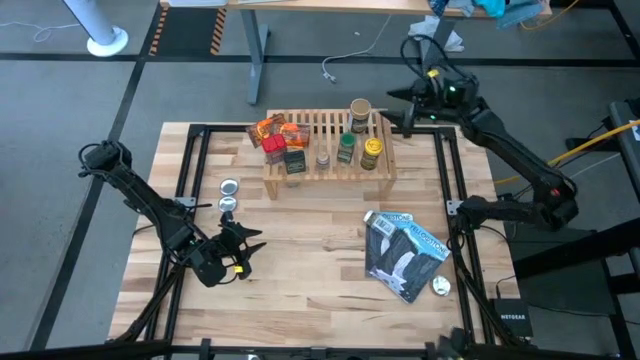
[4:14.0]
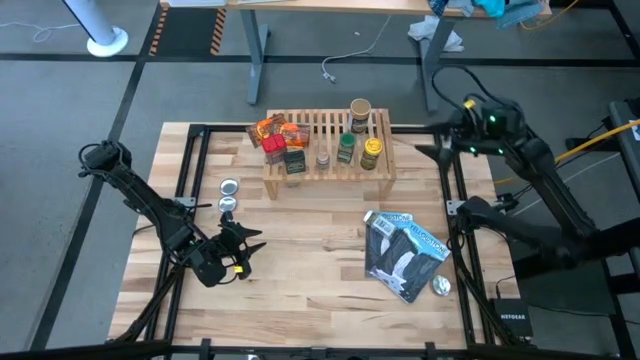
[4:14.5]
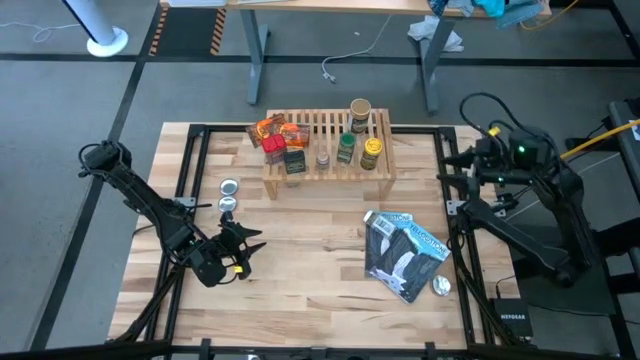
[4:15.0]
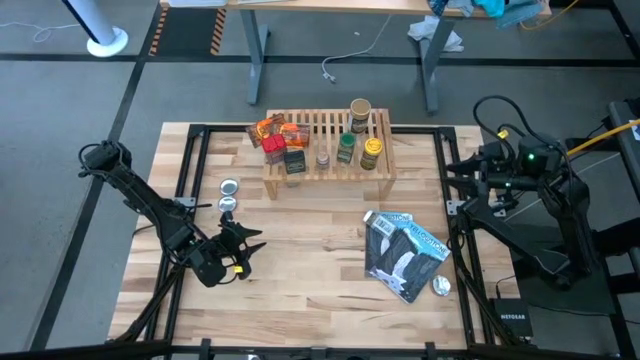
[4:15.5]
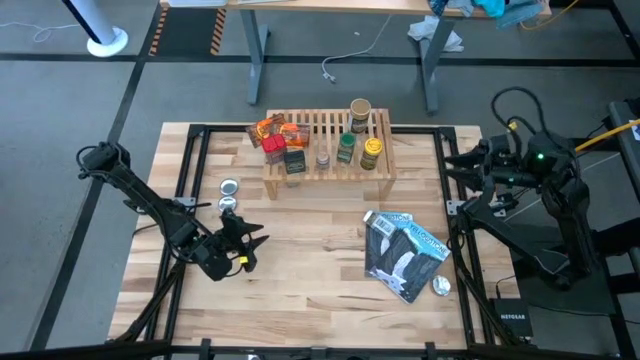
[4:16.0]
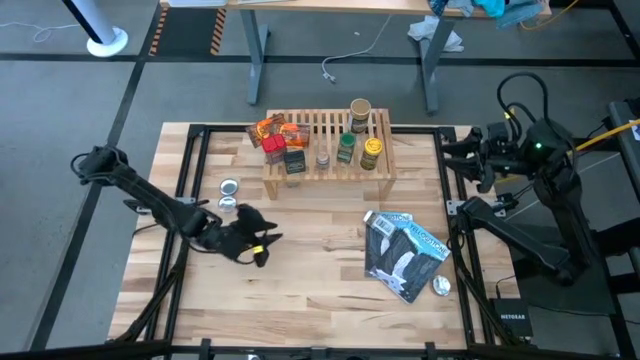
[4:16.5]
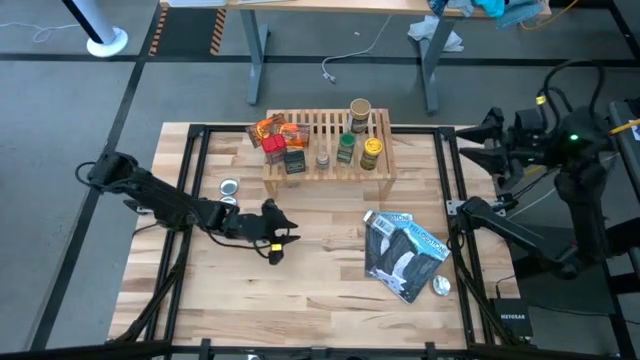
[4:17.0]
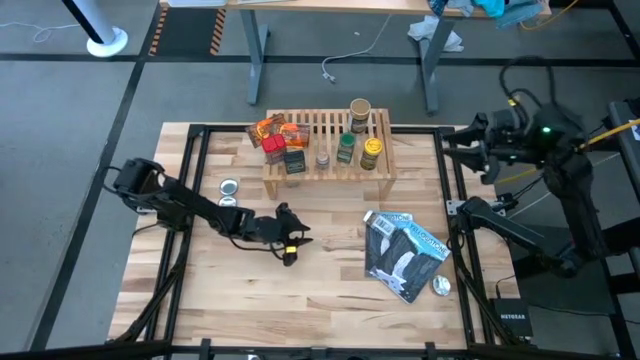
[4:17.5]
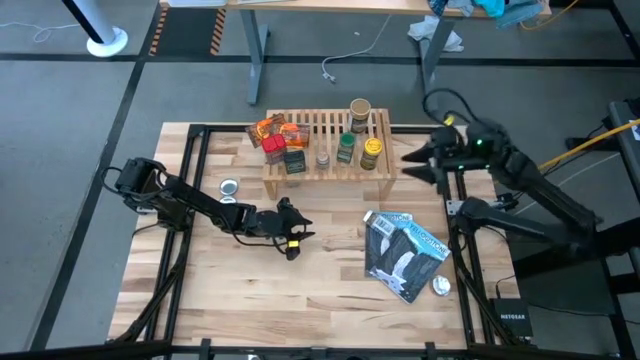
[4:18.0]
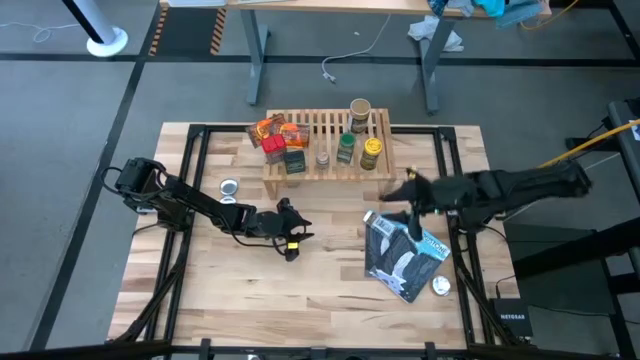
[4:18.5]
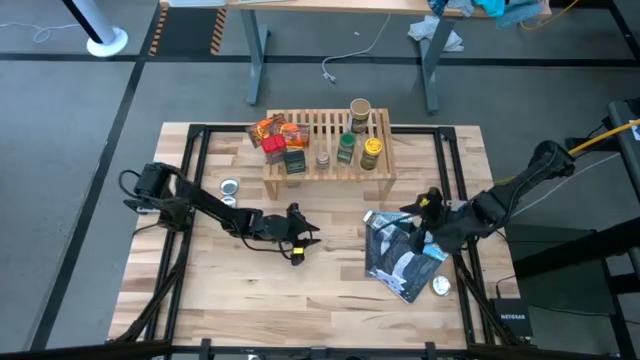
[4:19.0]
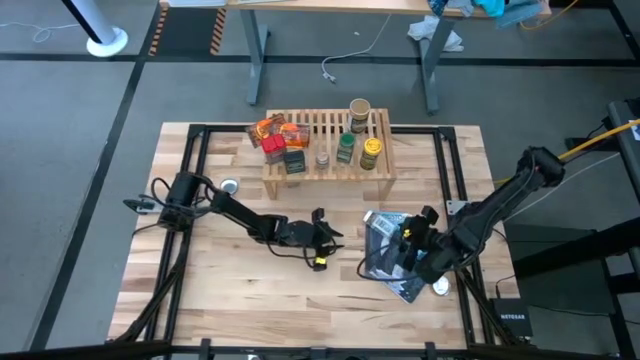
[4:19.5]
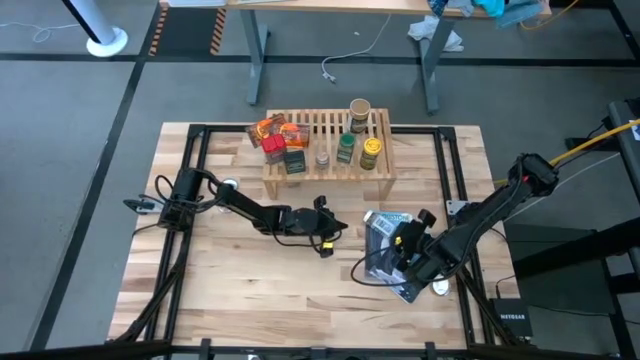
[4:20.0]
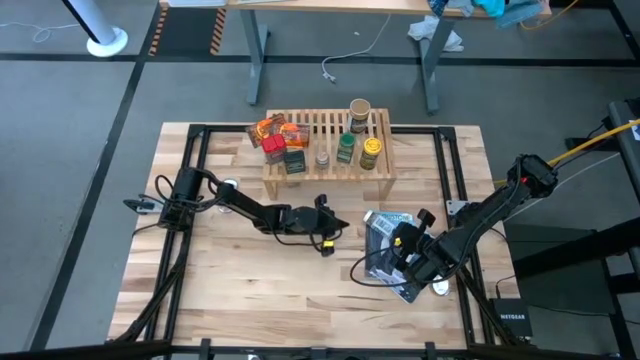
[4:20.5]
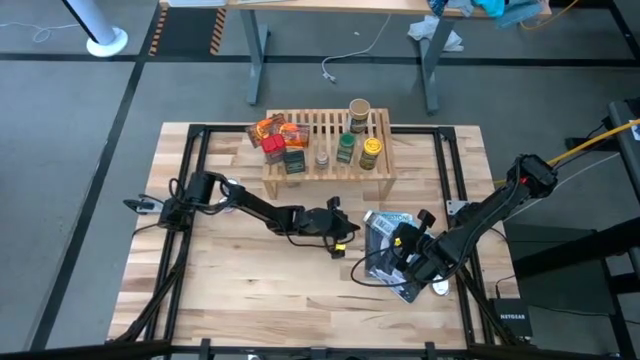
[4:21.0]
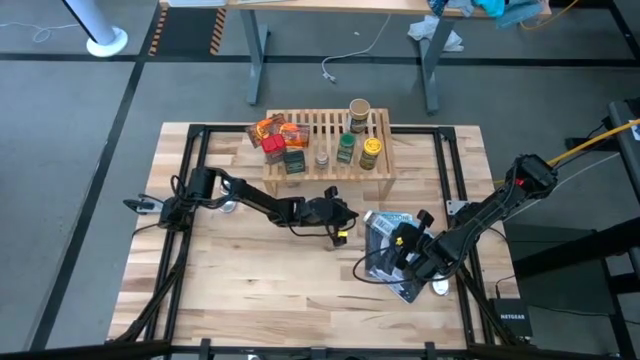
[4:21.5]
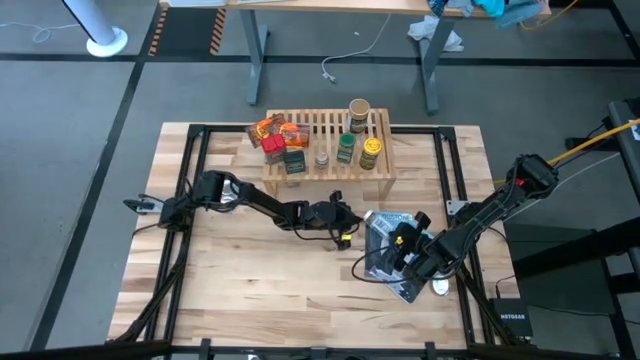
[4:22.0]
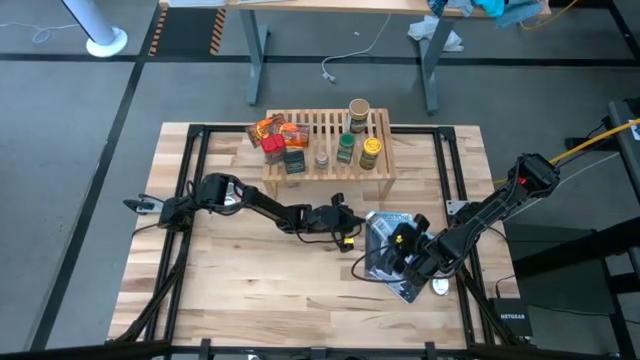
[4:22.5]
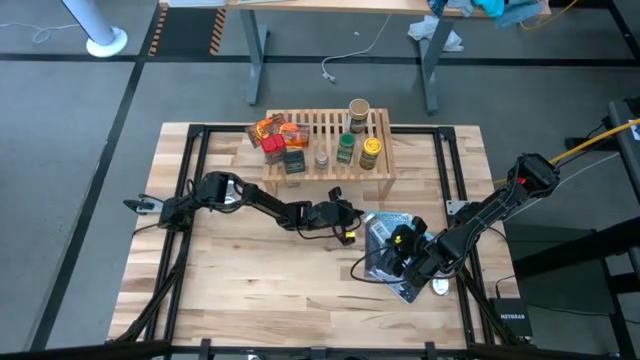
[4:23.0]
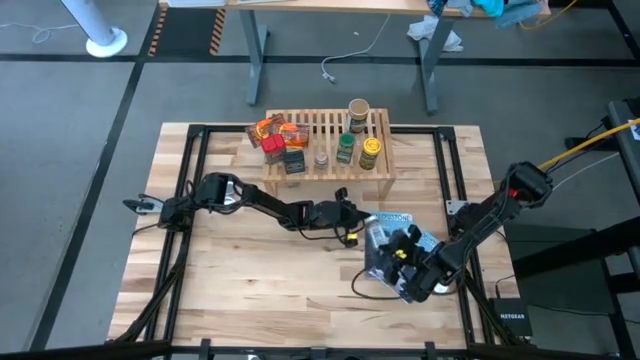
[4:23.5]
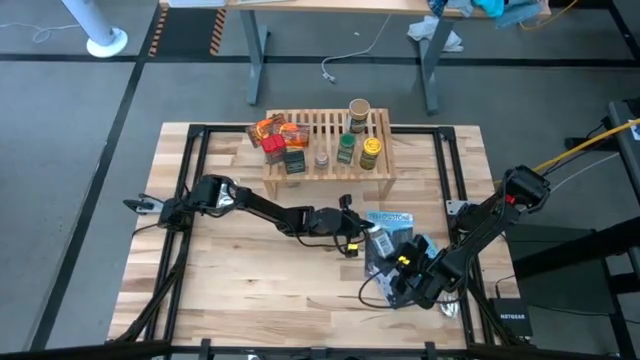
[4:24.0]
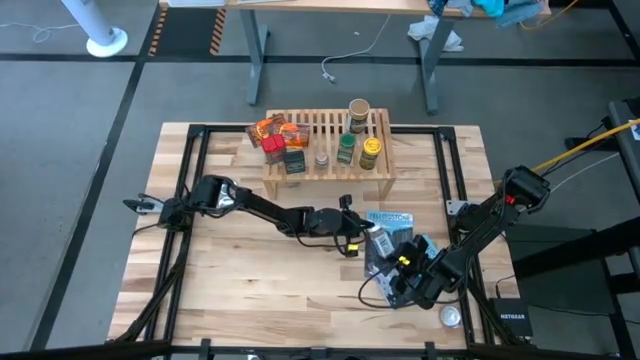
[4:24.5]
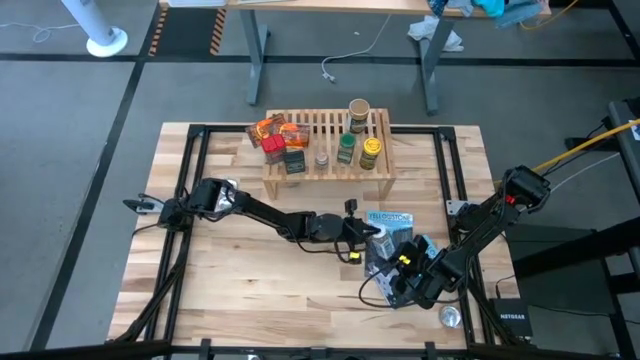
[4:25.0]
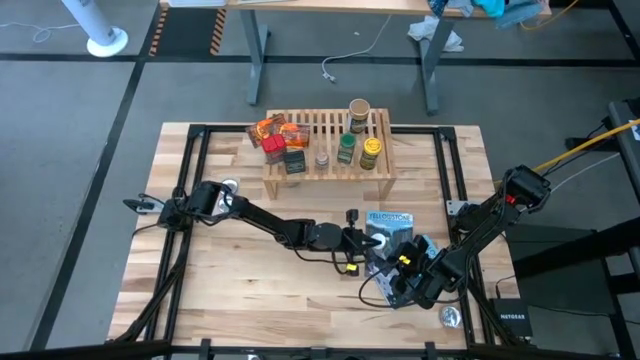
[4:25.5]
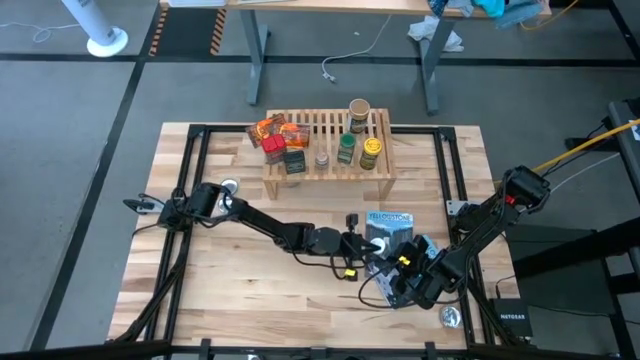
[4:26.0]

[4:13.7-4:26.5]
Task: Shelf spices
Put the white seasoning bottle on the shelf

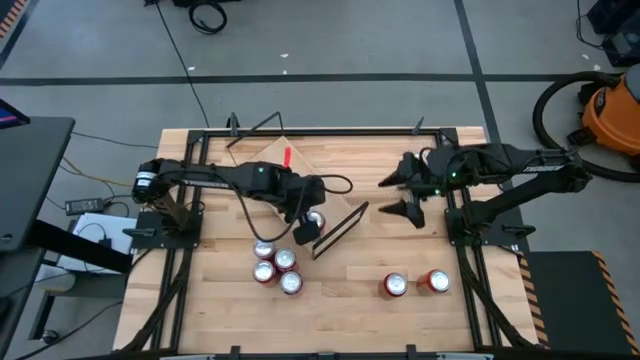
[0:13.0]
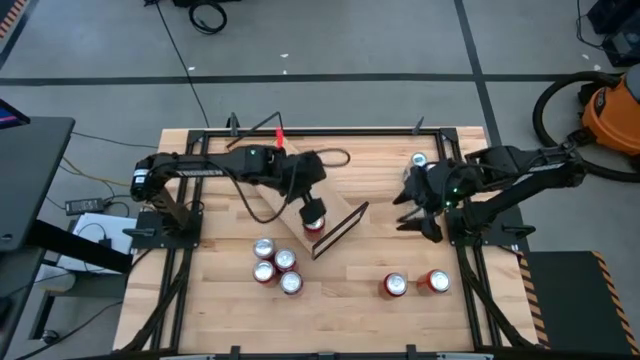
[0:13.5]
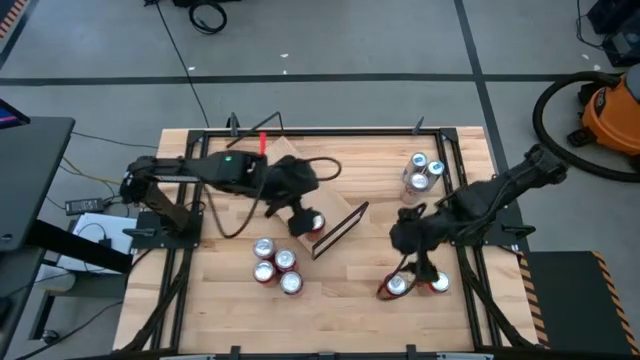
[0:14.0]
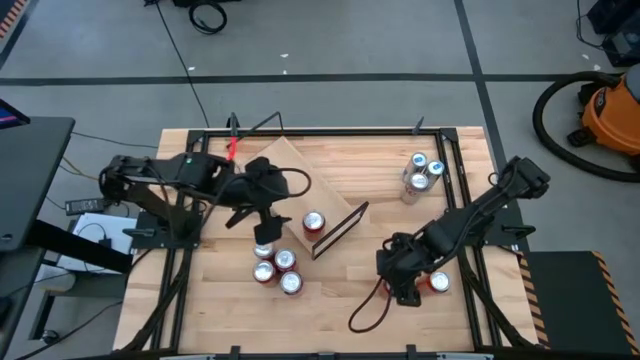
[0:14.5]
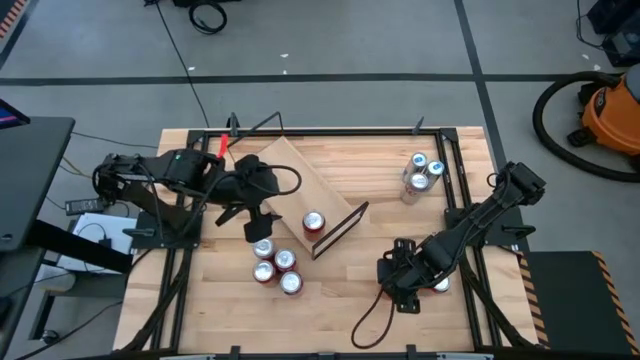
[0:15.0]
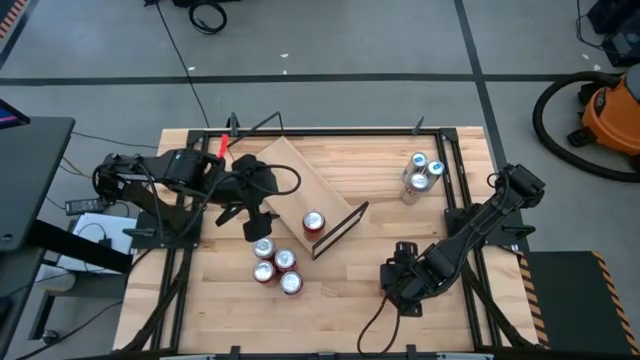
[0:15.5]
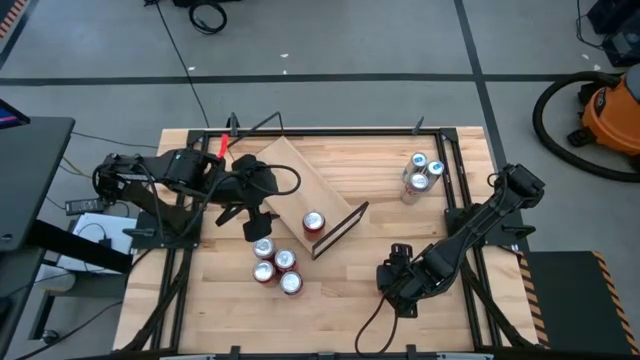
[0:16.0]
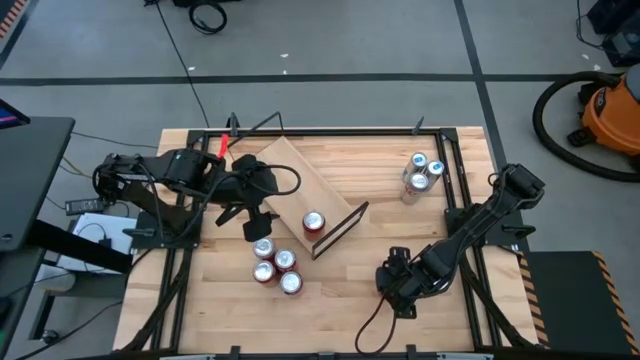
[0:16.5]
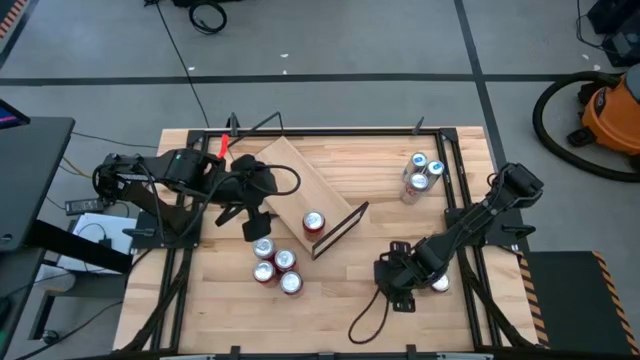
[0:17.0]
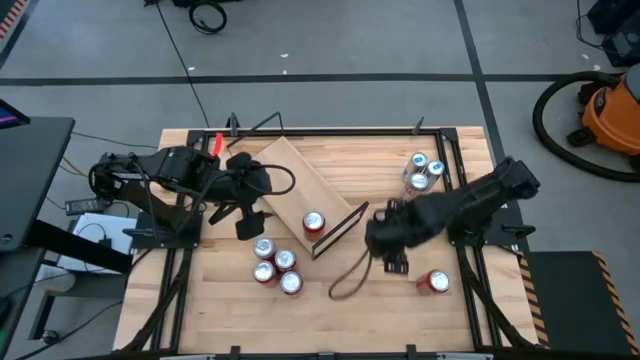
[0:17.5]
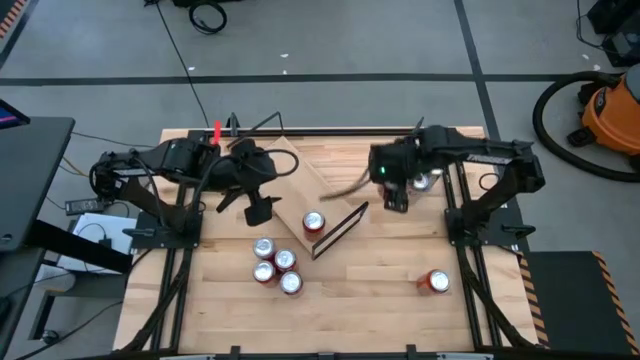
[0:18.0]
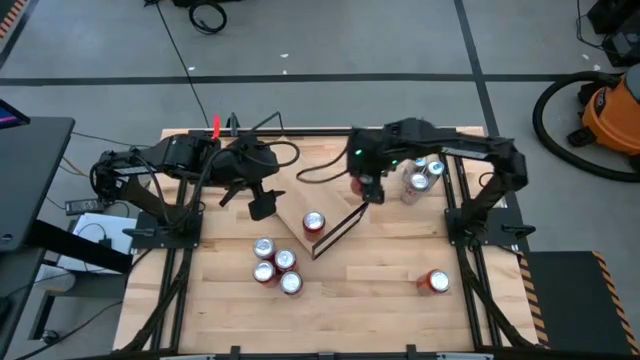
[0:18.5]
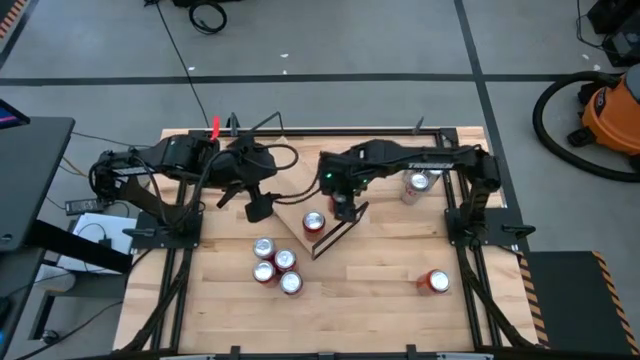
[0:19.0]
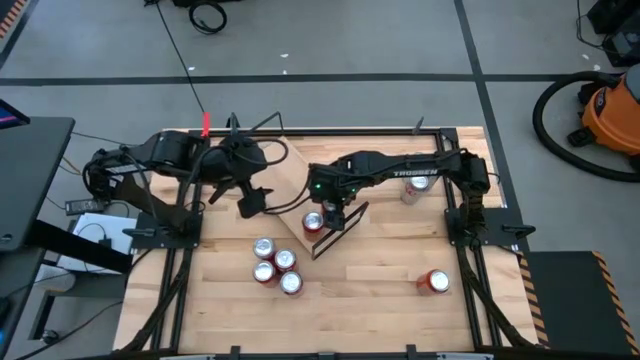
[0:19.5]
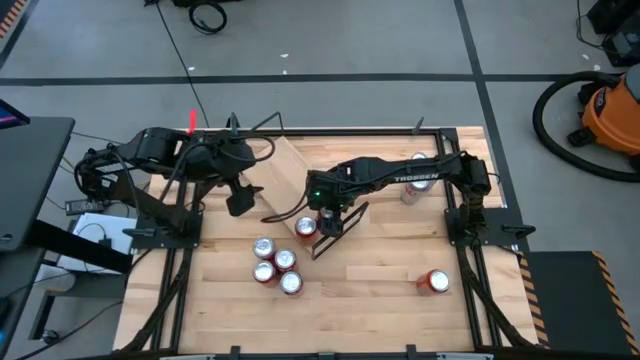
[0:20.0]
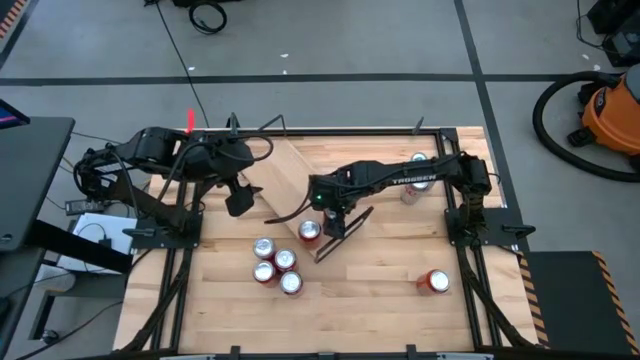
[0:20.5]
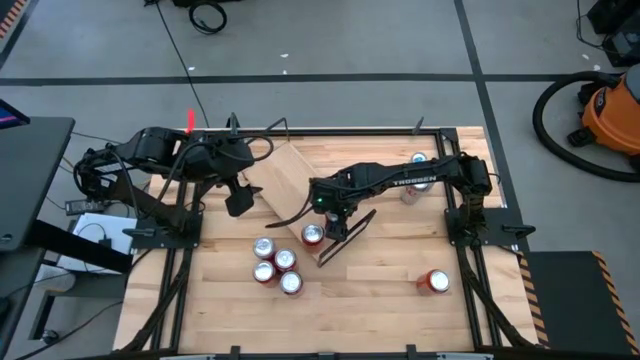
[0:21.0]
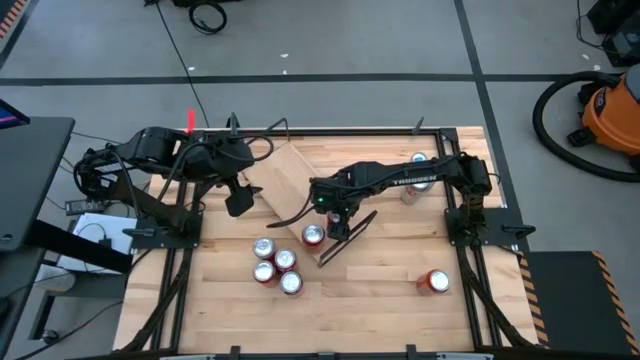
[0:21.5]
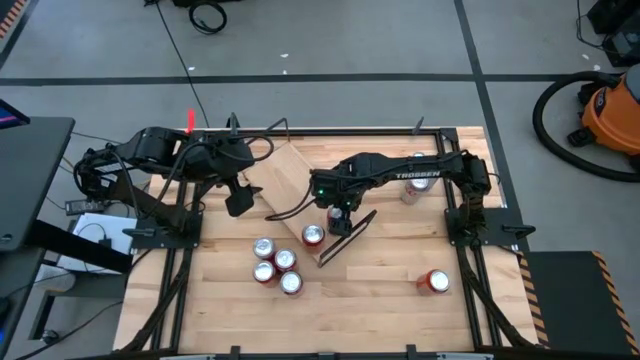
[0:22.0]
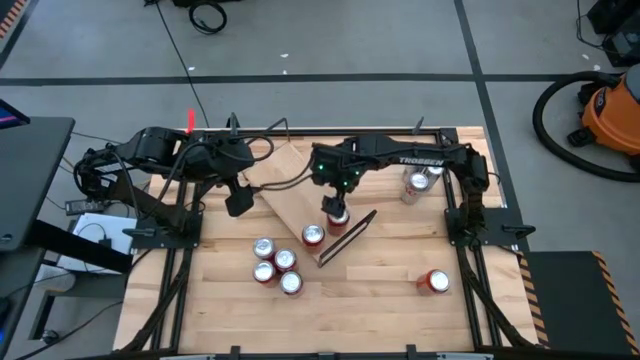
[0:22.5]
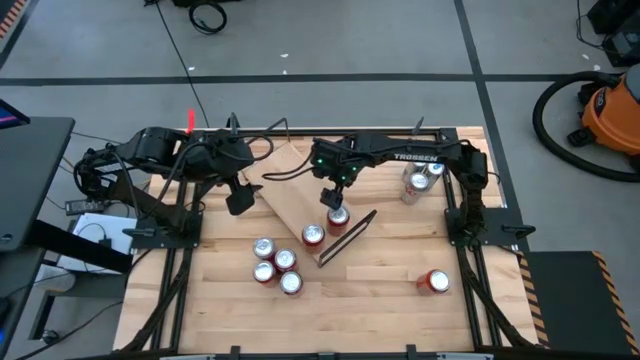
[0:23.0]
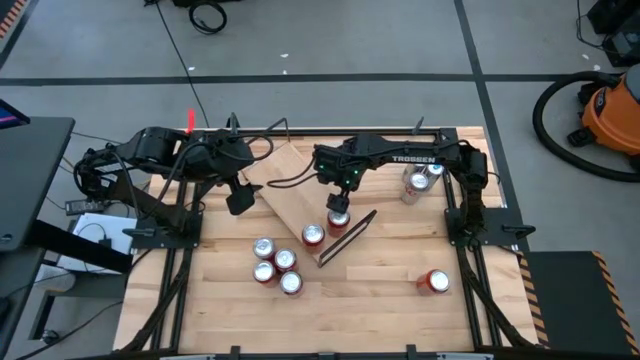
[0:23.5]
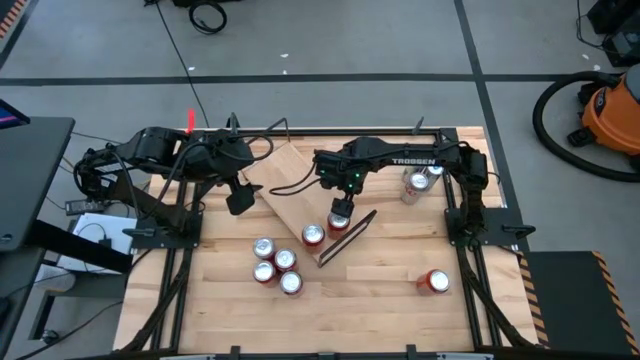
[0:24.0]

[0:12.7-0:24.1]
Task: Place canned beverage on shelf
Put the red and black soda can on the shelf aligned with the other red and black soda can
